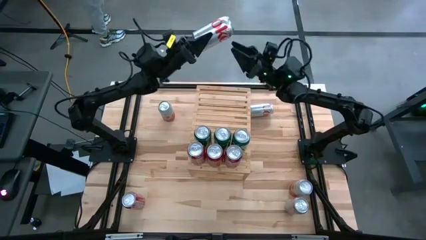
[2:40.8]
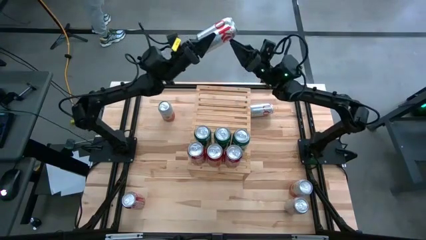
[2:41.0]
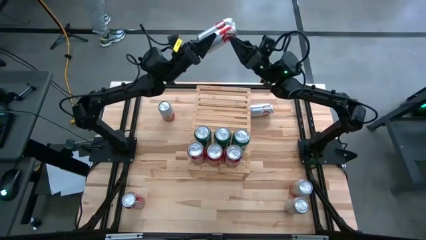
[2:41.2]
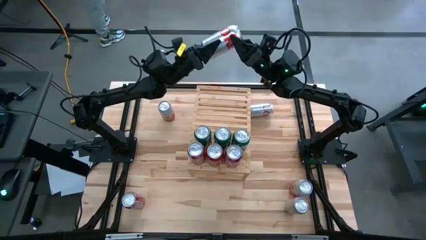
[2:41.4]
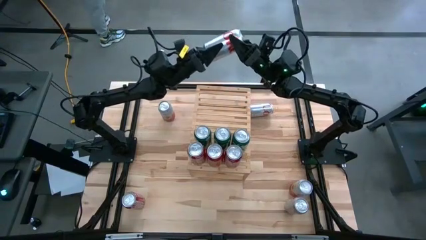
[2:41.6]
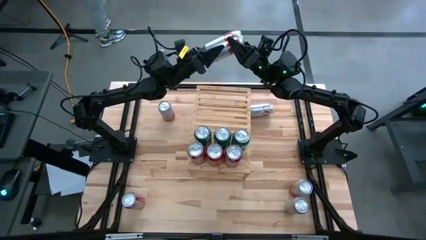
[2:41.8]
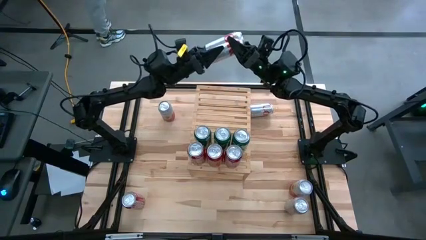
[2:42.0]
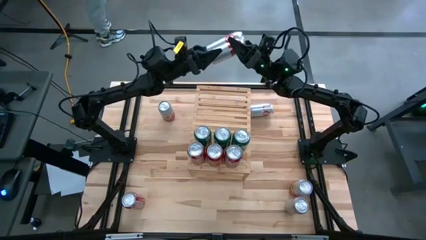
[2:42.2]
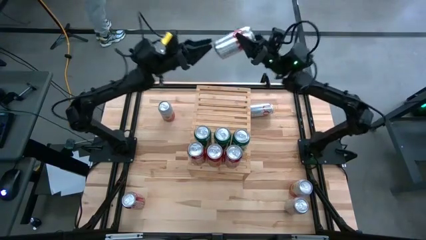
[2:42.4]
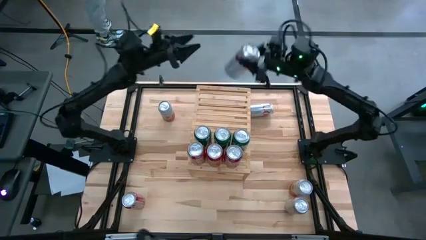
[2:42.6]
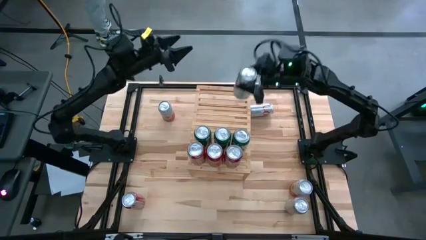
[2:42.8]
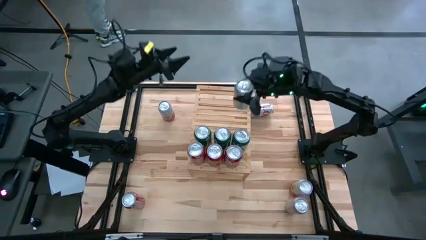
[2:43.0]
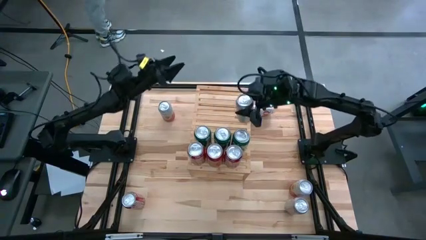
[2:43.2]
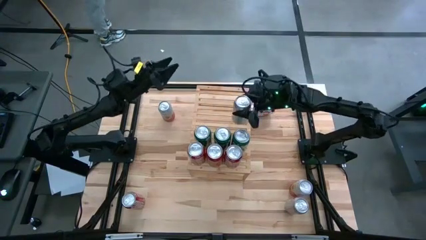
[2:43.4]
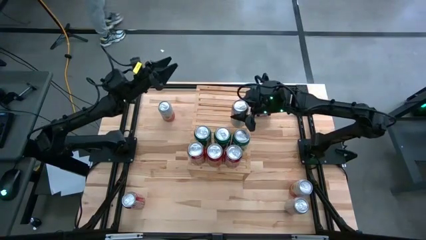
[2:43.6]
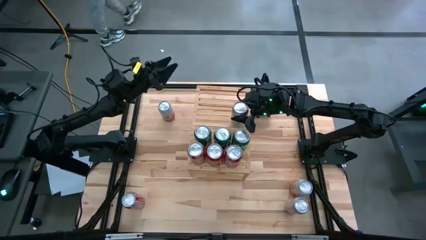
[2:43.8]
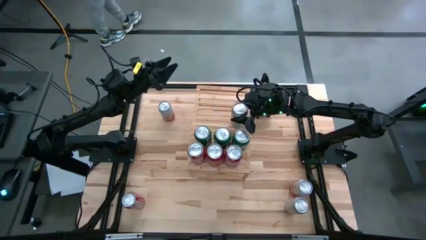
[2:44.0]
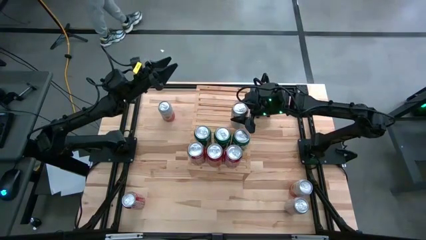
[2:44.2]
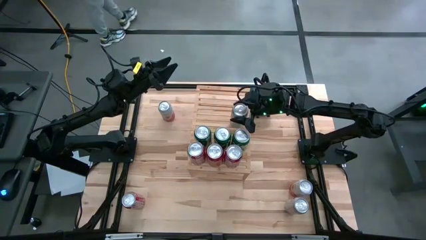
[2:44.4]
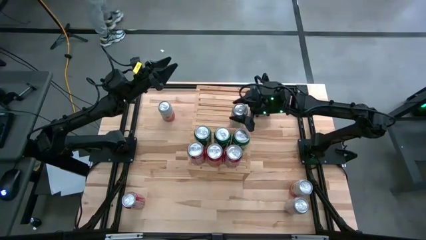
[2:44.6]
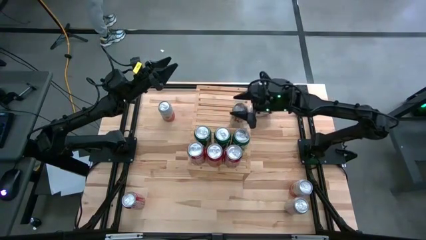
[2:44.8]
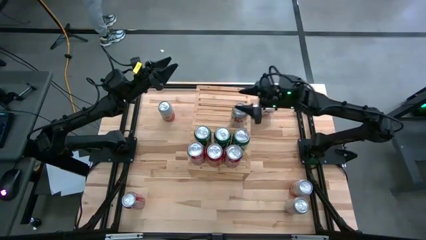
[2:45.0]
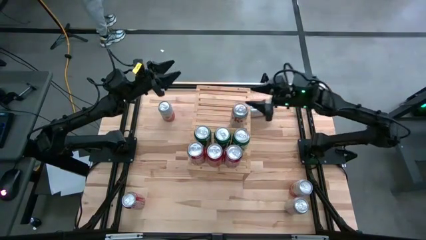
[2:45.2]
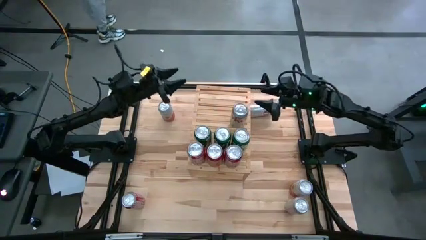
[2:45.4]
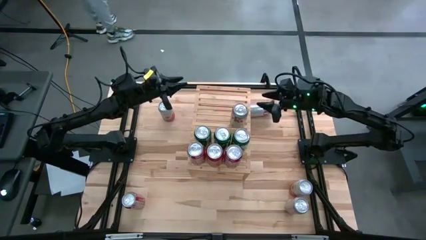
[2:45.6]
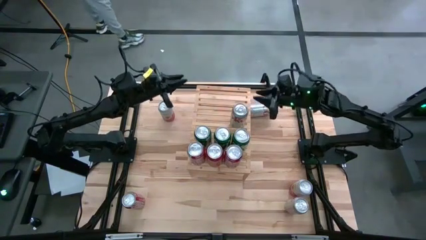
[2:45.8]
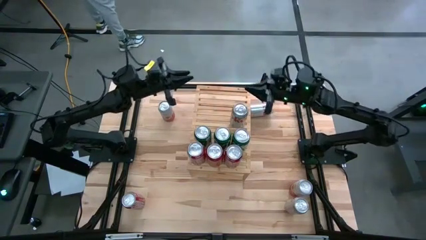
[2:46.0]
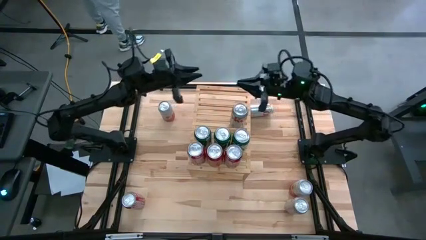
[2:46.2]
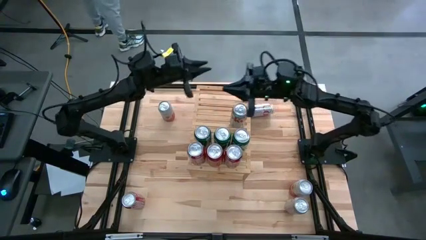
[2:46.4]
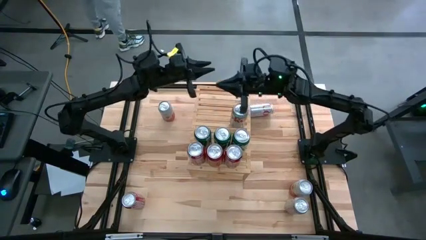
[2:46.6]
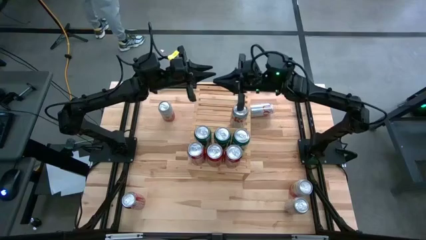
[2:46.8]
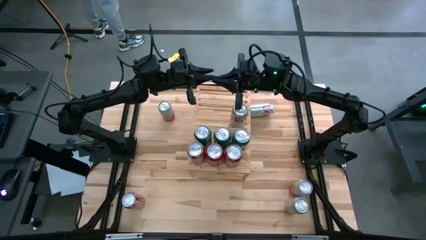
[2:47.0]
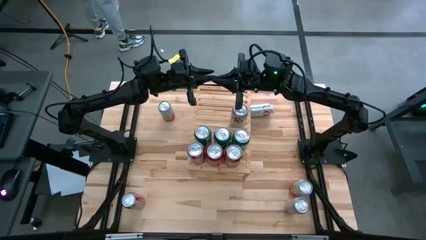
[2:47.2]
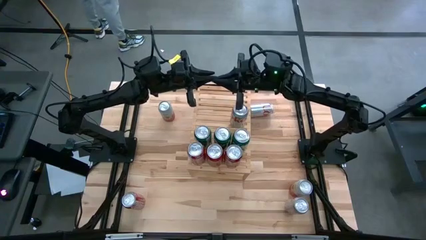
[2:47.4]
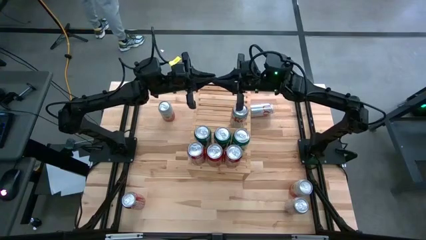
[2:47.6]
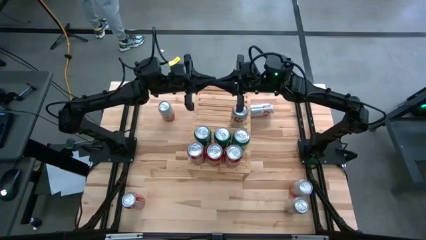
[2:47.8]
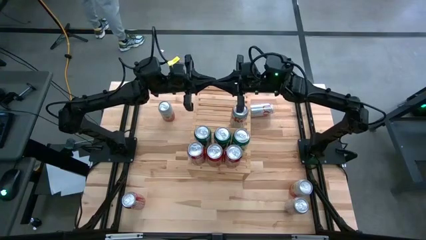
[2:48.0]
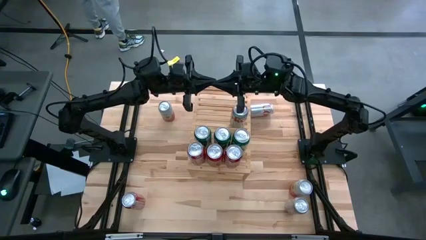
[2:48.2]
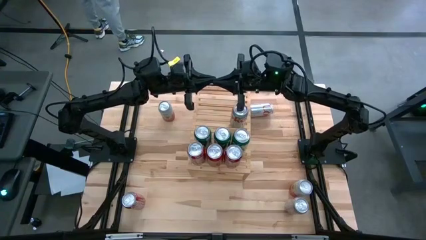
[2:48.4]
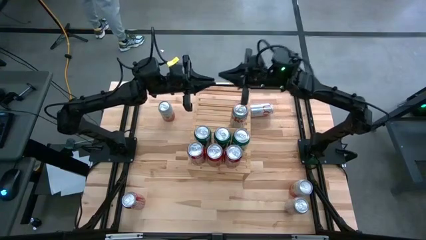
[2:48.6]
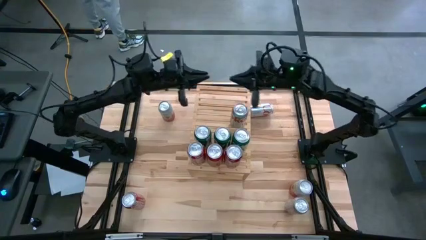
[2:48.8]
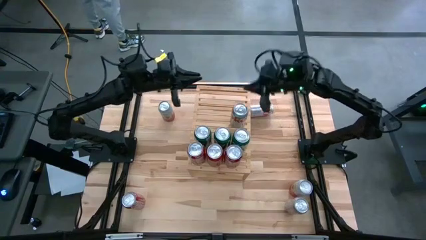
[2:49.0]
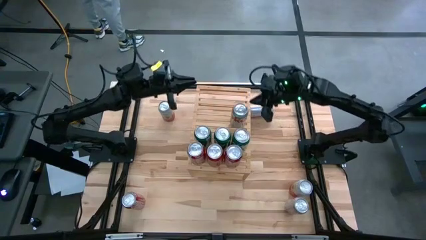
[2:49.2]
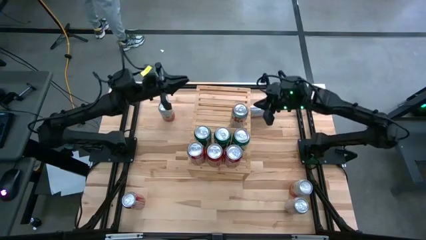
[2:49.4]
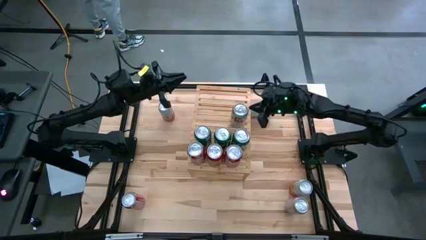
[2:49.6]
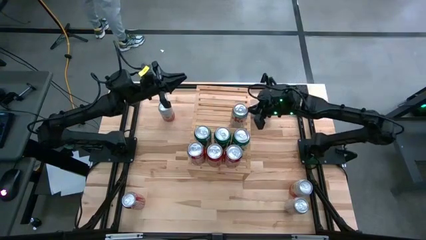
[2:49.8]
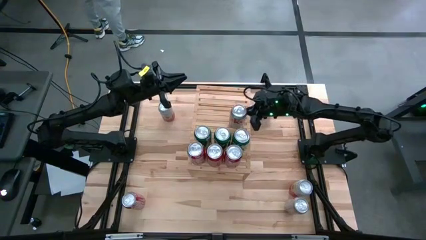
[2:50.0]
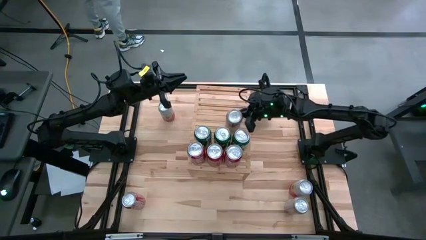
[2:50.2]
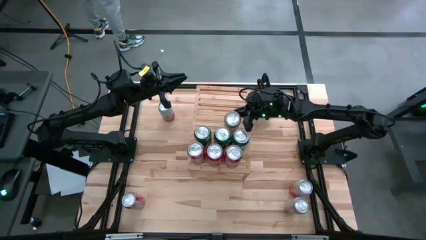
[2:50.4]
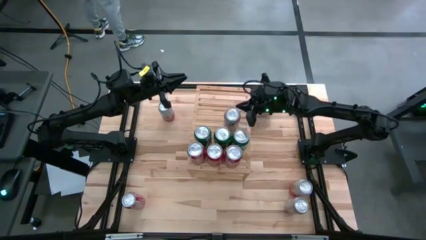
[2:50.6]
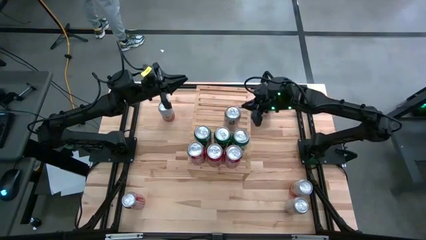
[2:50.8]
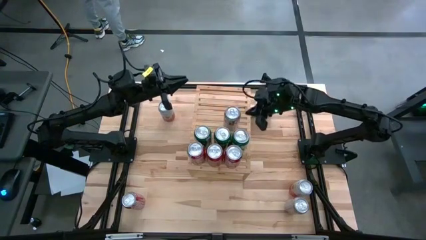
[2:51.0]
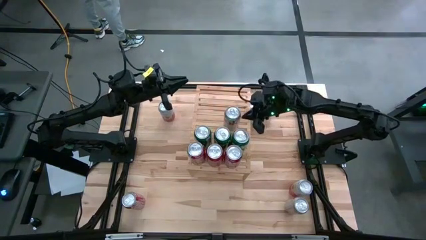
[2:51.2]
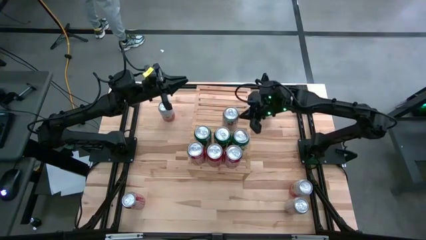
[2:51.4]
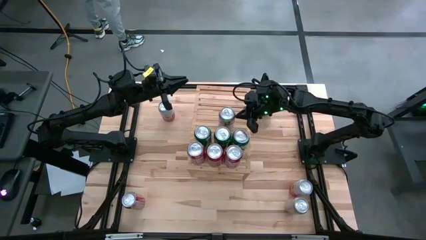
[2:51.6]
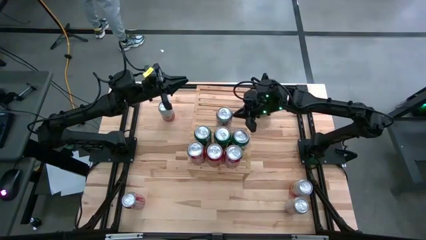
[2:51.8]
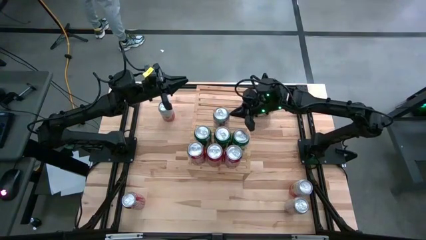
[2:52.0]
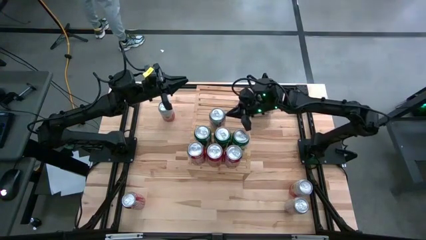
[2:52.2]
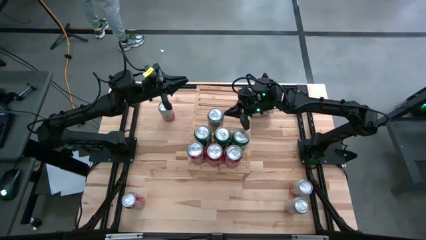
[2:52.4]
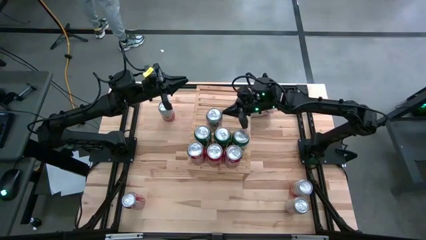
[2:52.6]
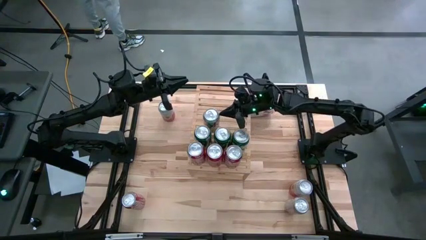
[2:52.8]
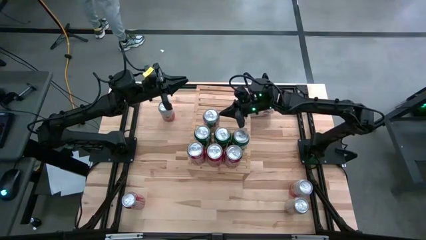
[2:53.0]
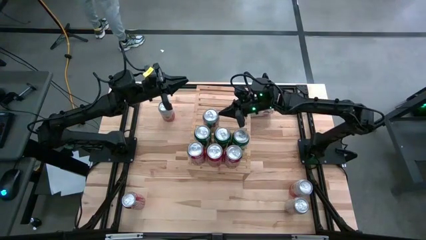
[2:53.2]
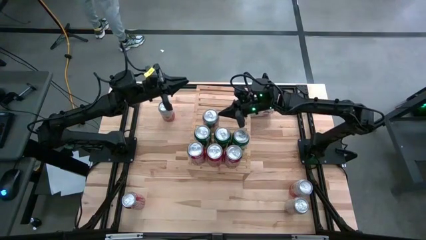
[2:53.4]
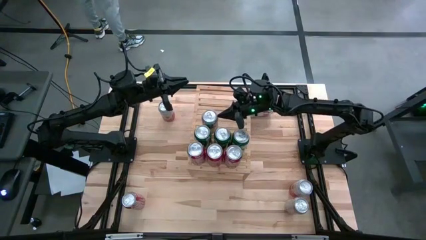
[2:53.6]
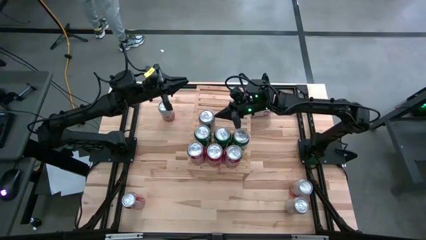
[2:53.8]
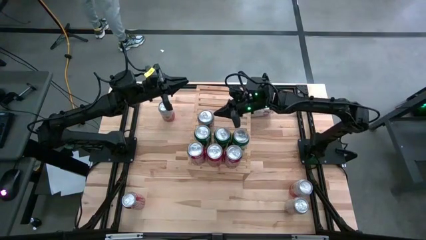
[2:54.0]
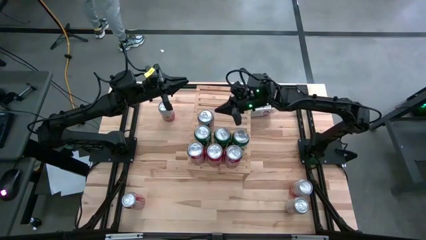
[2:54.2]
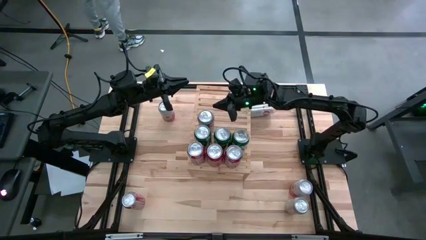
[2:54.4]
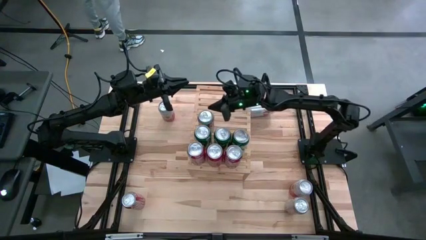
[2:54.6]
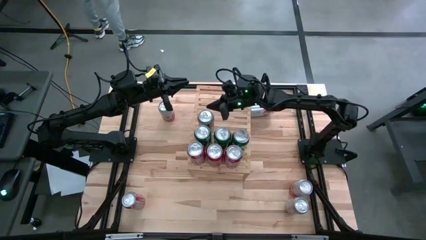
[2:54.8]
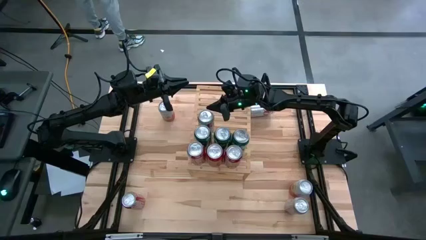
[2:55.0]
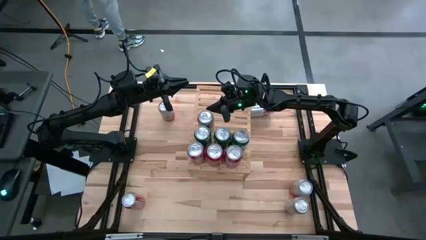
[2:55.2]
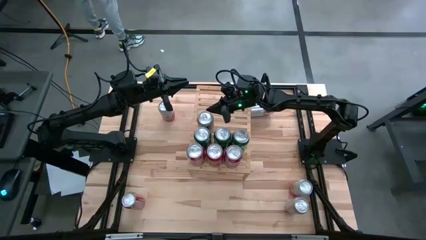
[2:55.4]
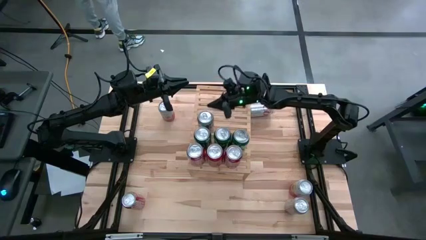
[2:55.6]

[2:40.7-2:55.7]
Task: Place canned beverage on shelf
Put the top left red-silver soda can on the shelf
